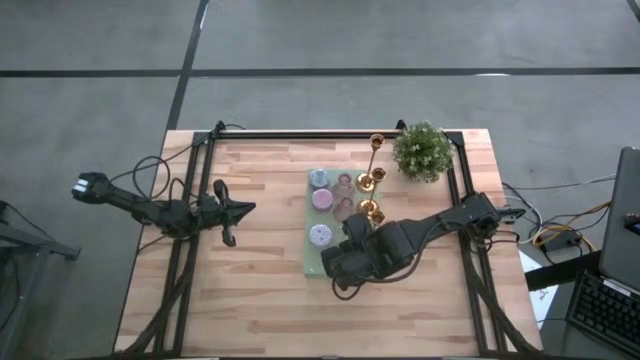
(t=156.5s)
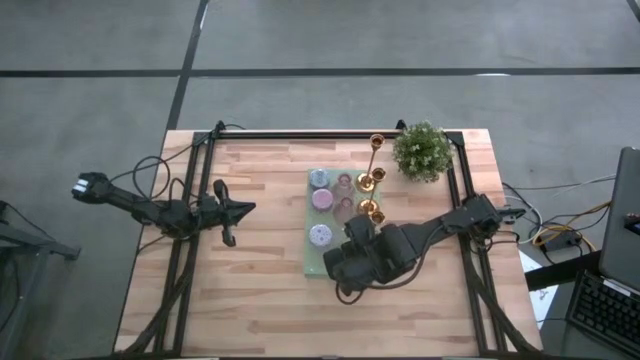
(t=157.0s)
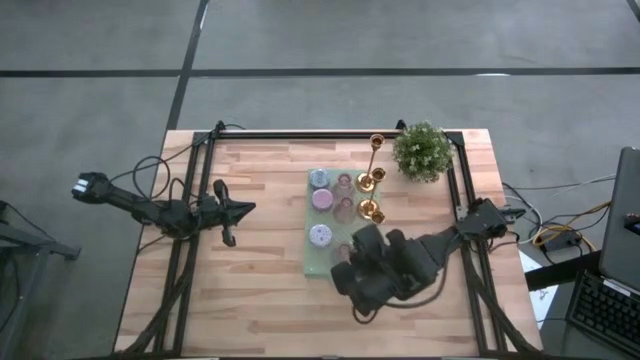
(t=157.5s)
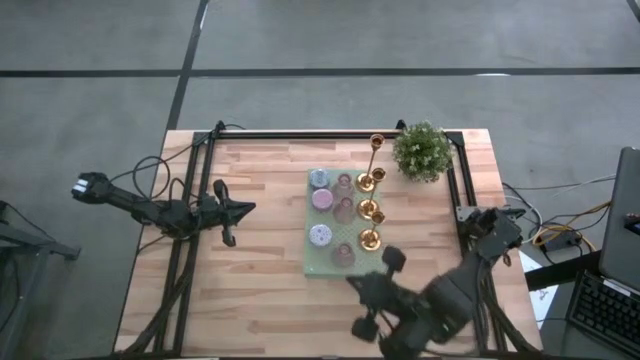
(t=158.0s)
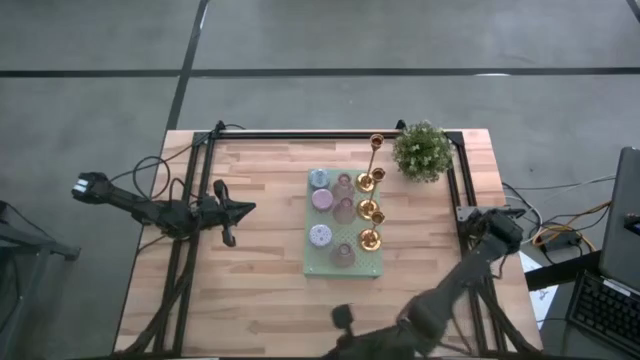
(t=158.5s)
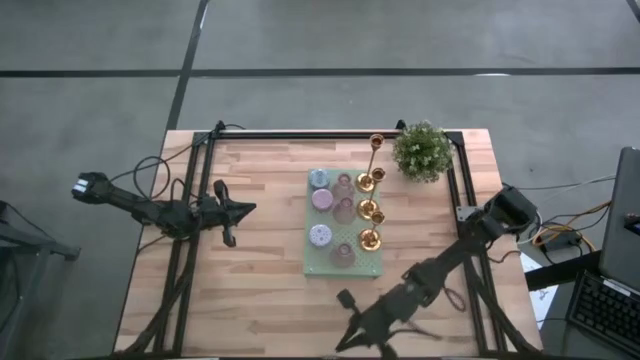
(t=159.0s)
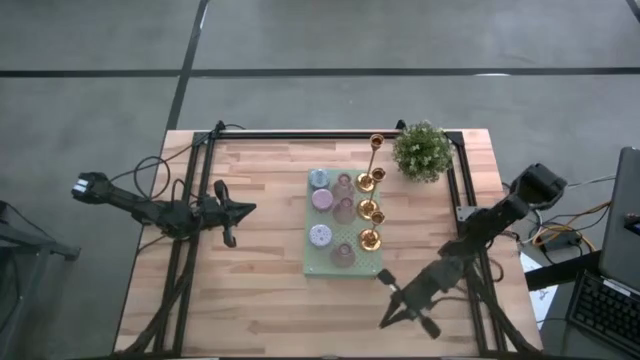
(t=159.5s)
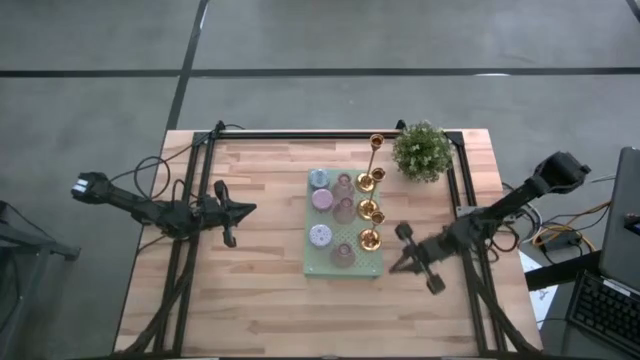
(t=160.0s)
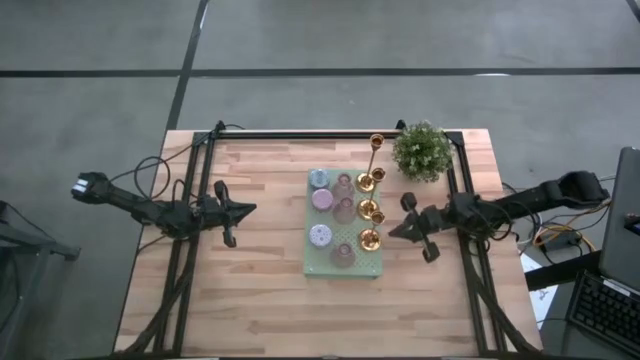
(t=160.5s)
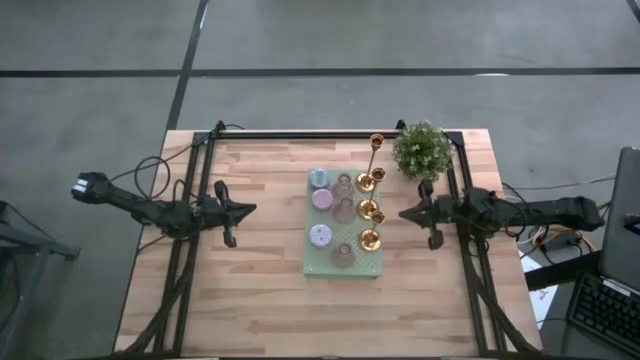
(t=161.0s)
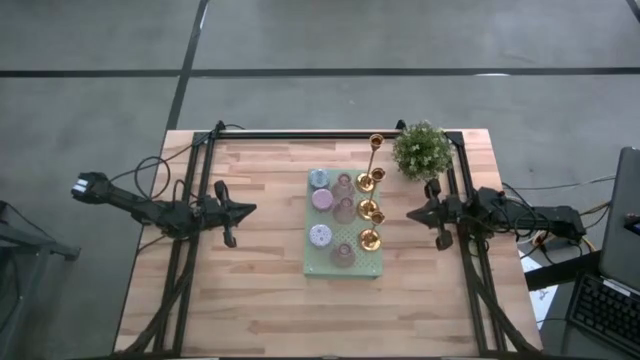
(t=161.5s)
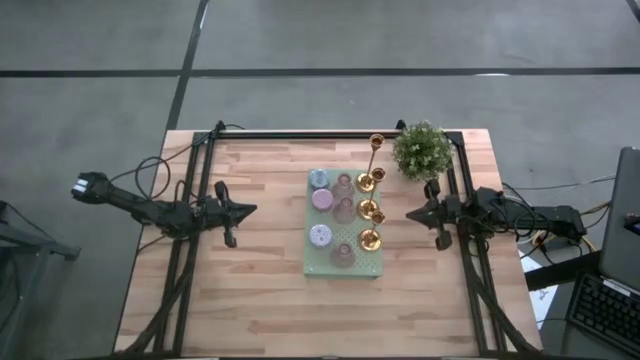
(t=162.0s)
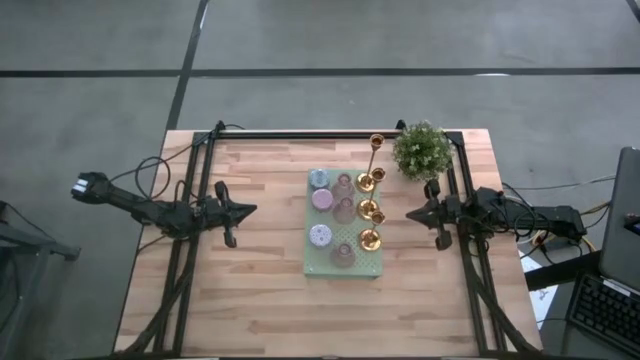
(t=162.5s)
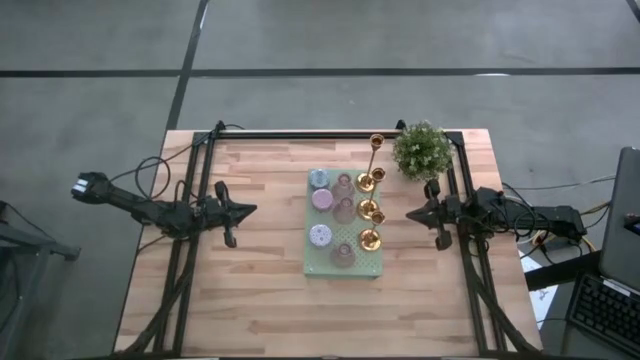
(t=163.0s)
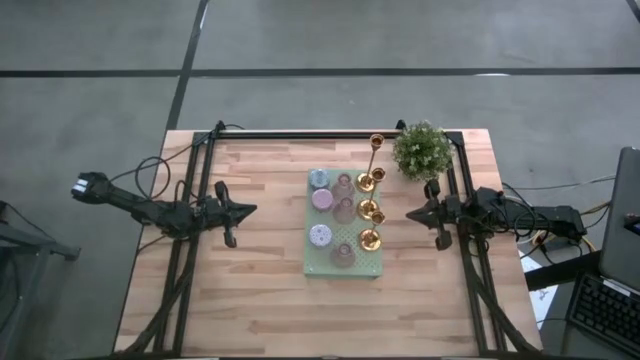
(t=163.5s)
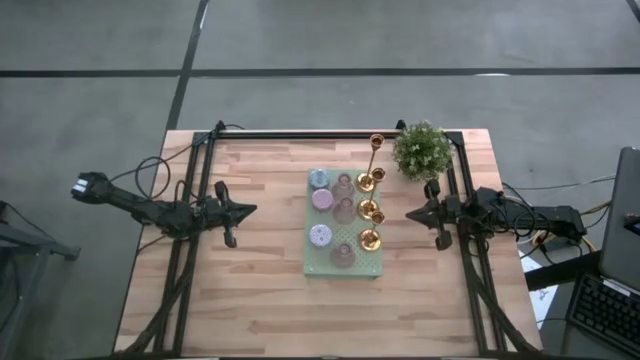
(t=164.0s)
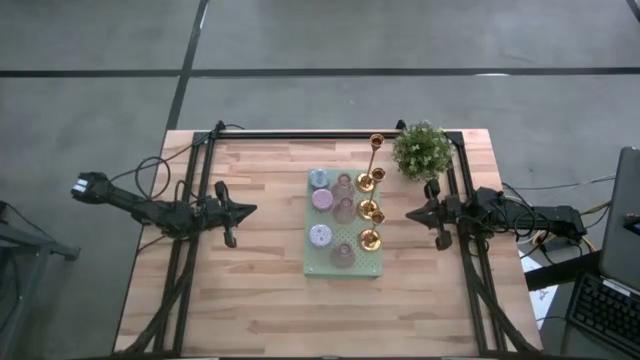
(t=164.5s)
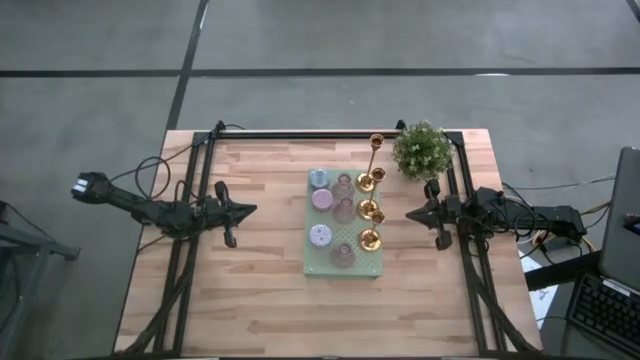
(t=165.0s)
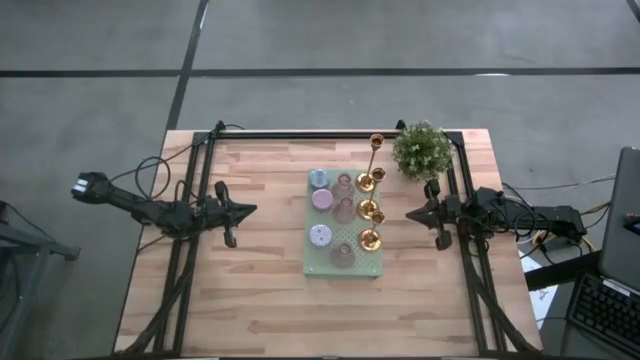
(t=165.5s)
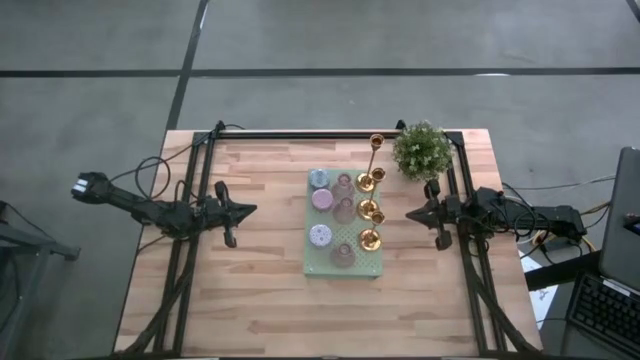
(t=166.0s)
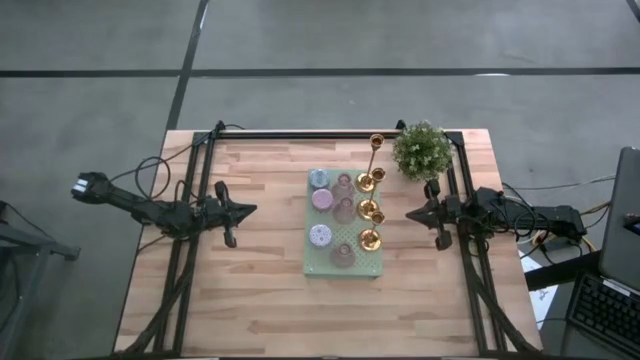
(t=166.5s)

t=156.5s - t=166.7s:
Task: Pick & Place candle stick holders
Return to Home Position

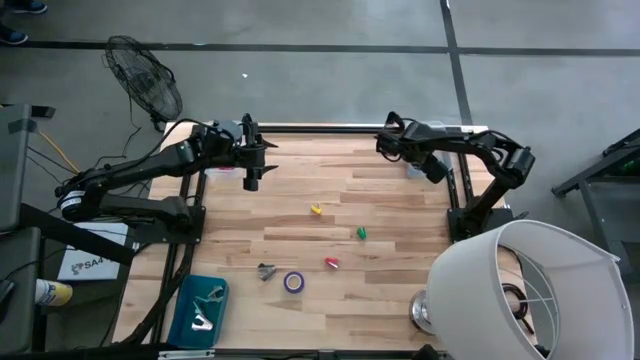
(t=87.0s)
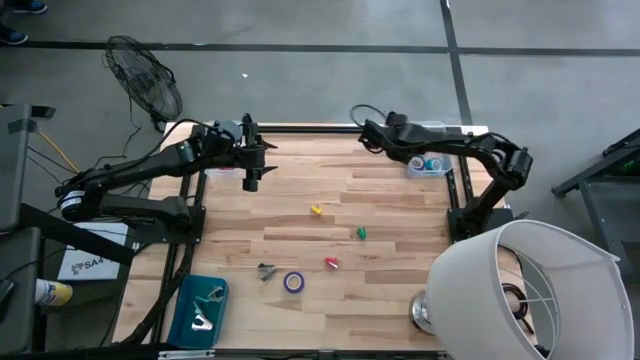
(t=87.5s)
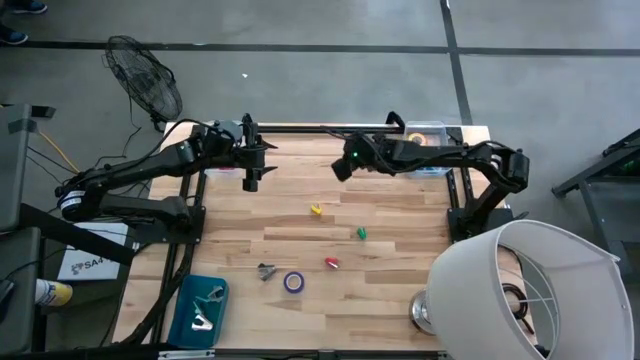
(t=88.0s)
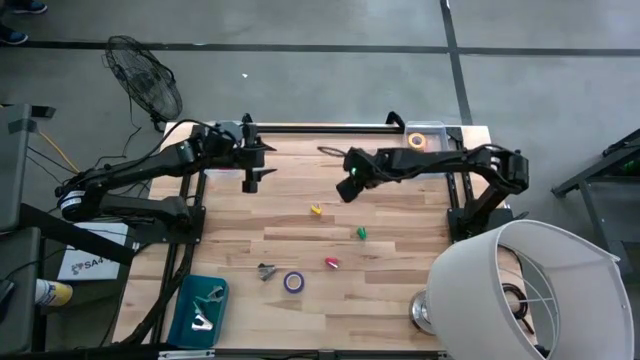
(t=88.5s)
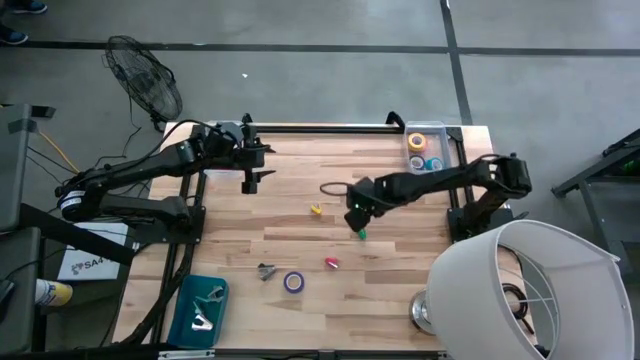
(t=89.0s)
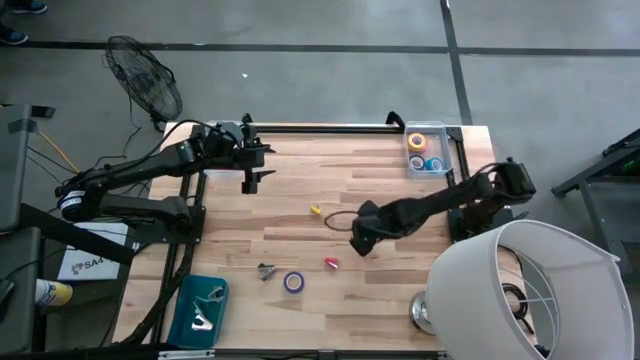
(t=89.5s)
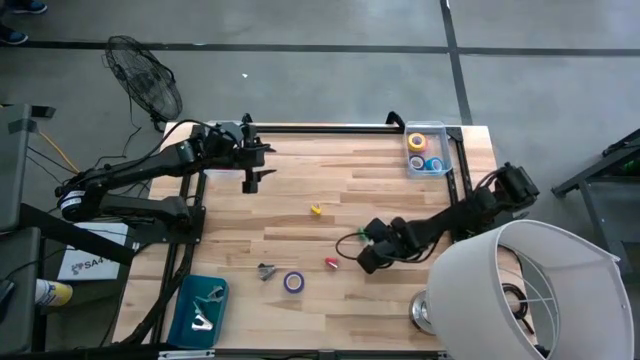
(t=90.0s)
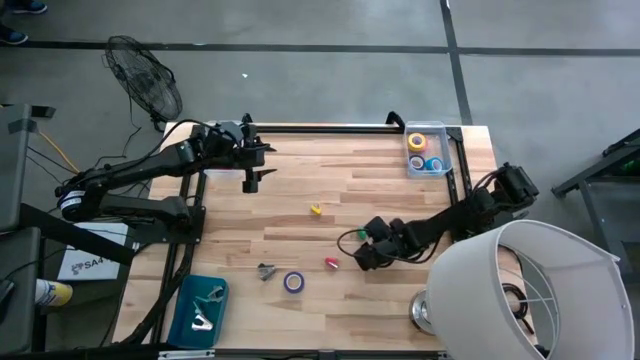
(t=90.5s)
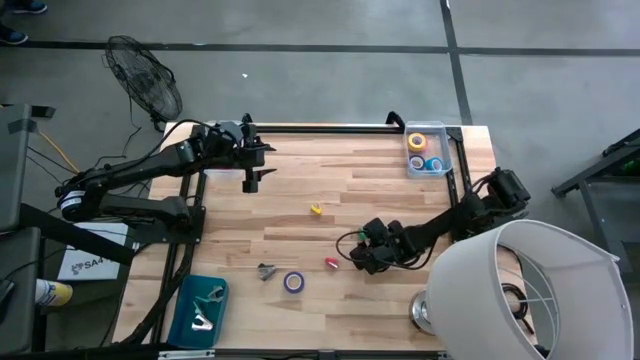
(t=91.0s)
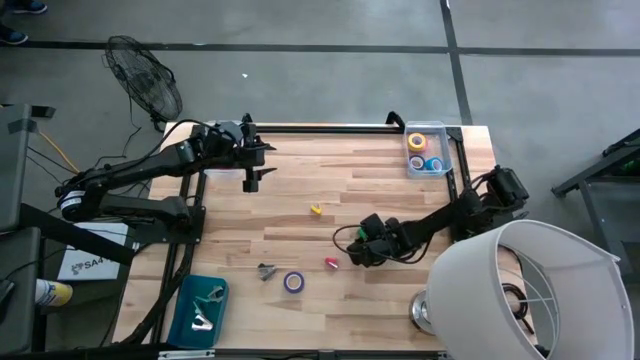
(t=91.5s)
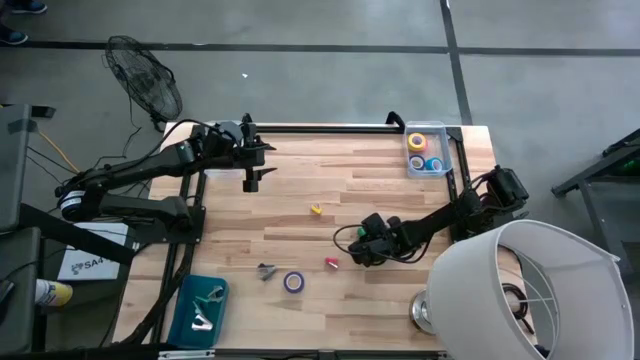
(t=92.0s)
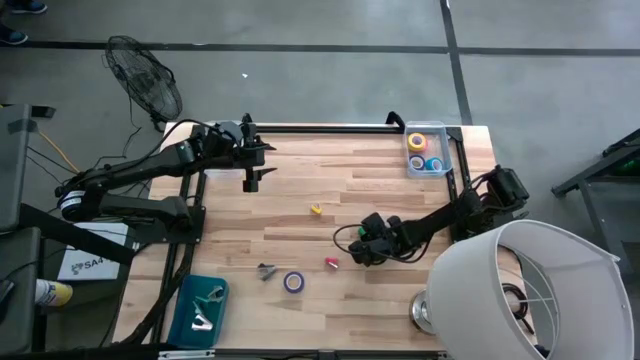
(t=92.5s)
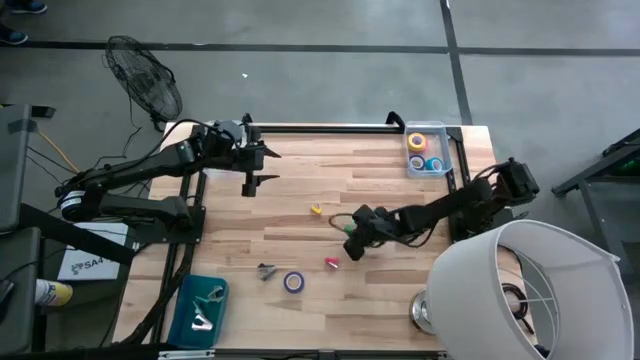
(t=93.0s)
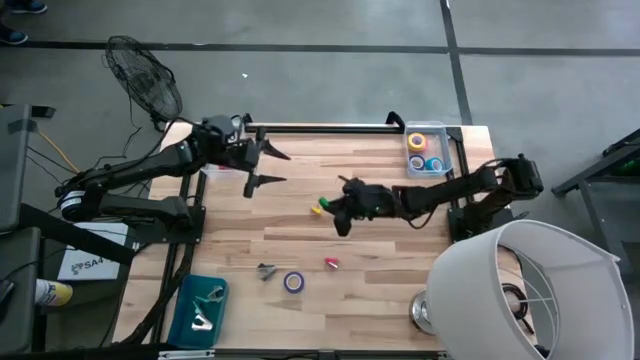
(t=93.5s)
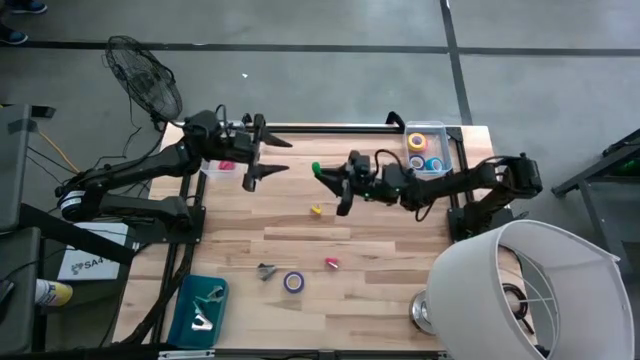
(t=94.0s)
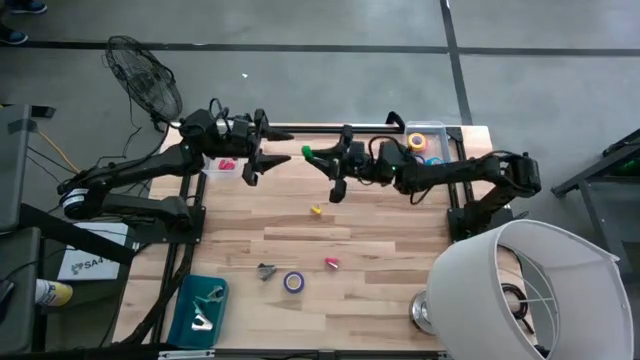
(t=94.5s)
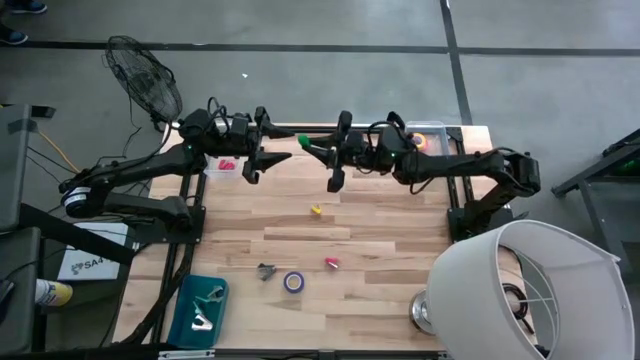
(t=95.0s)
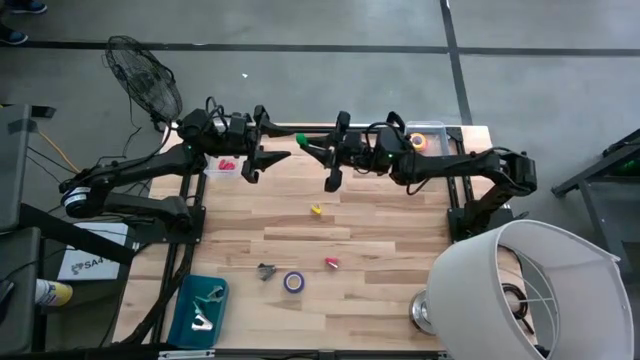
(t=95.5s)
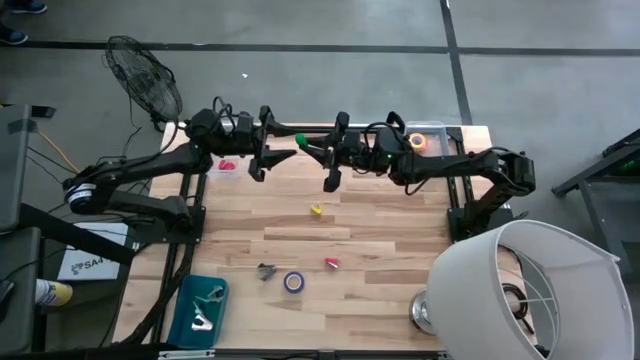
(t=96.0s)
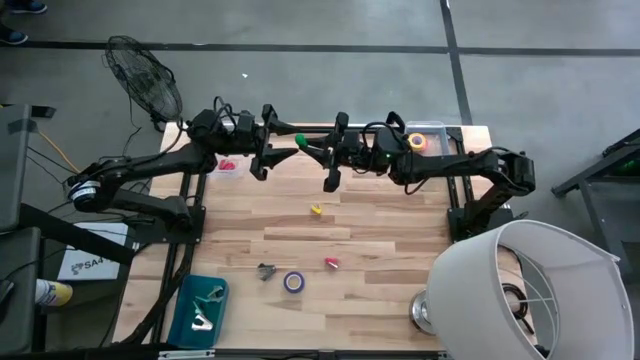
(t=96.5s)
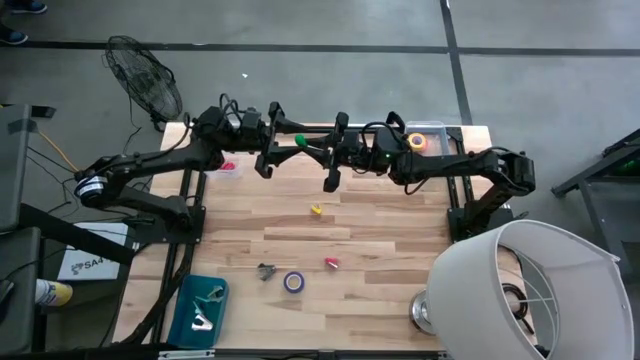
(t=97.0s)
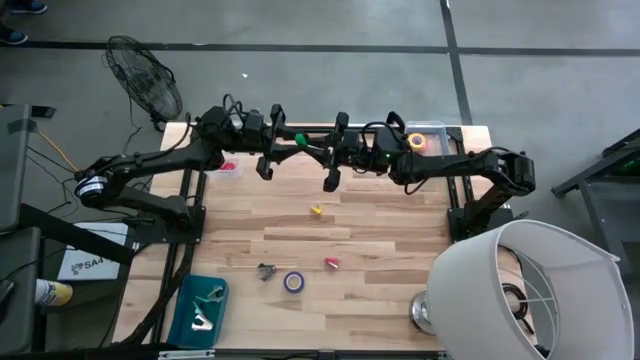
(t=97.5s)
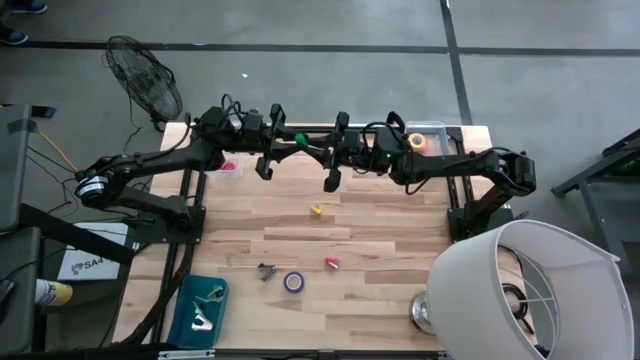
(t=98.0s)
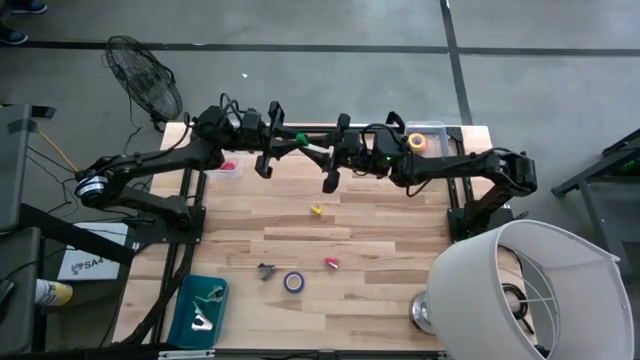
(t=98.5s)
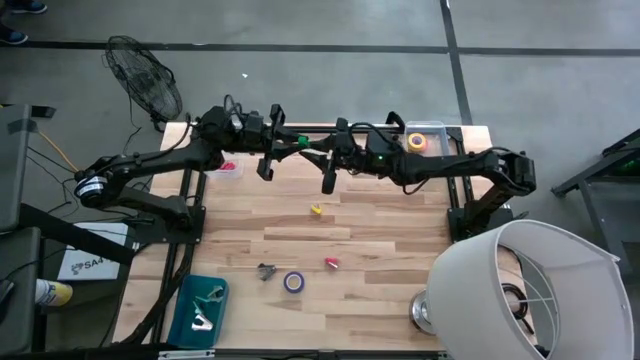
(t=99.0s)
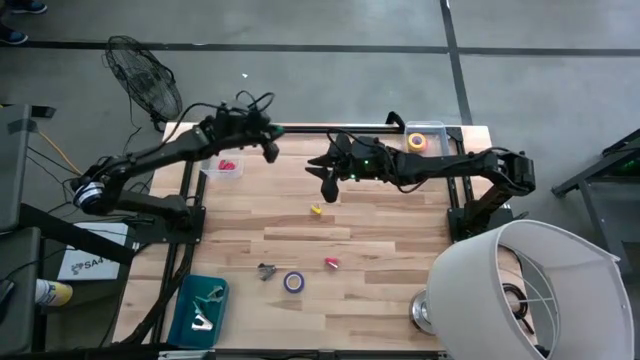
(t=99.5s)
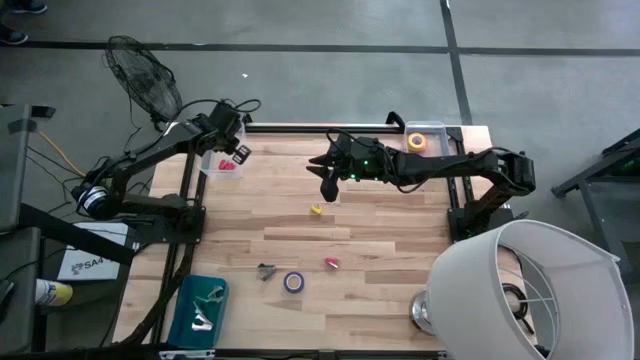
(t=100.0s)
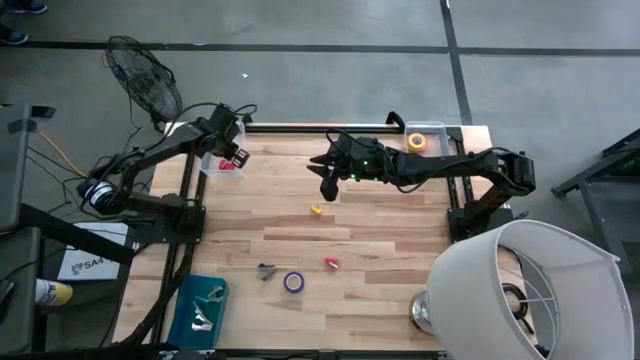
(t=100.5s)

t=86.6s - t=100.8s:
Task: Pick and place Stapler, Stapler remover, tape
Put the green stapler into the left transparent bin
